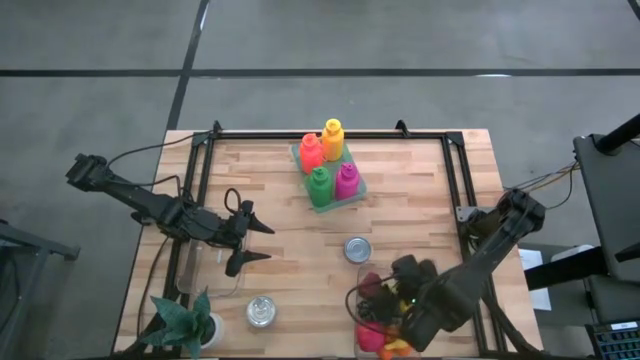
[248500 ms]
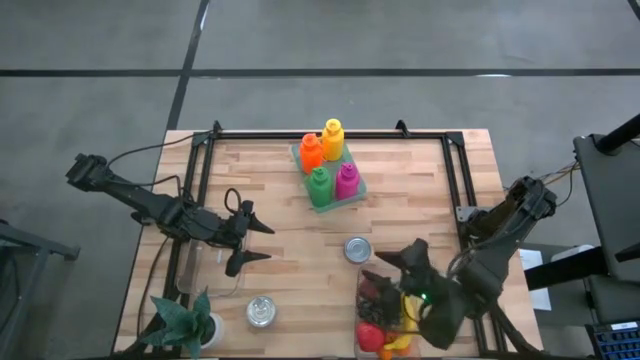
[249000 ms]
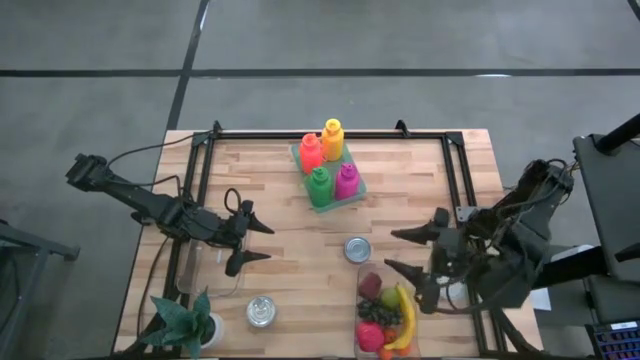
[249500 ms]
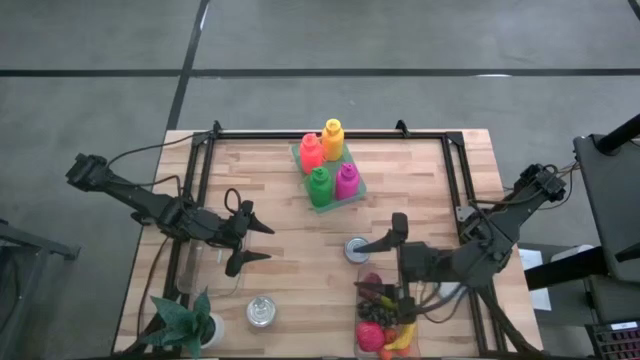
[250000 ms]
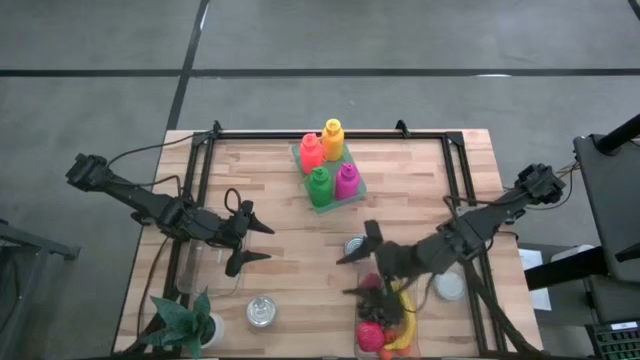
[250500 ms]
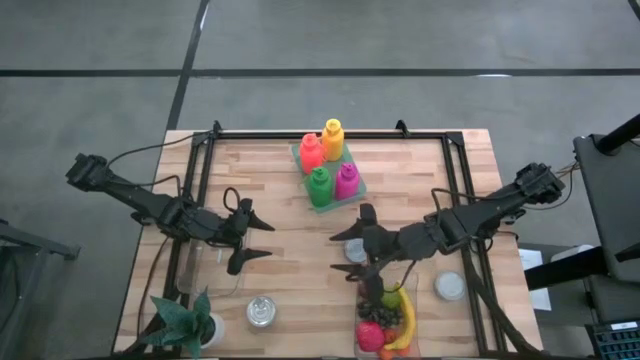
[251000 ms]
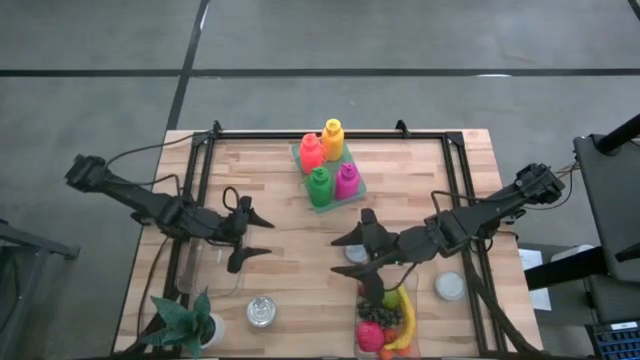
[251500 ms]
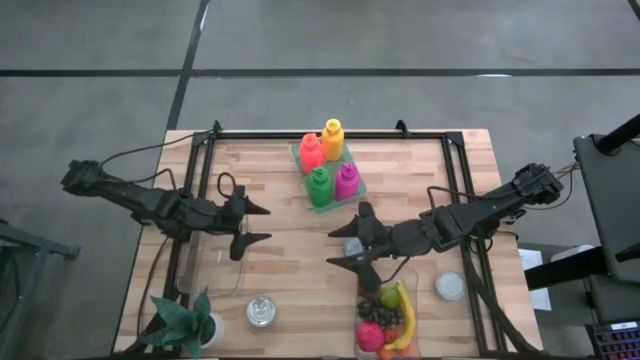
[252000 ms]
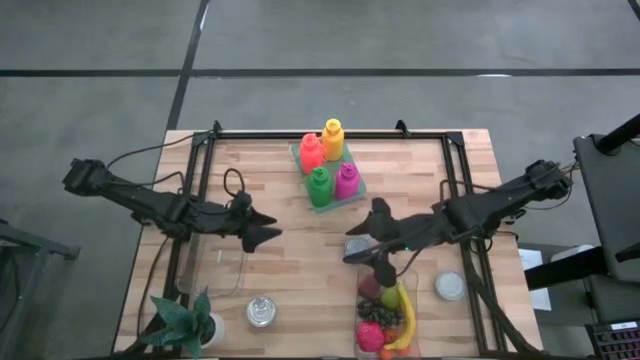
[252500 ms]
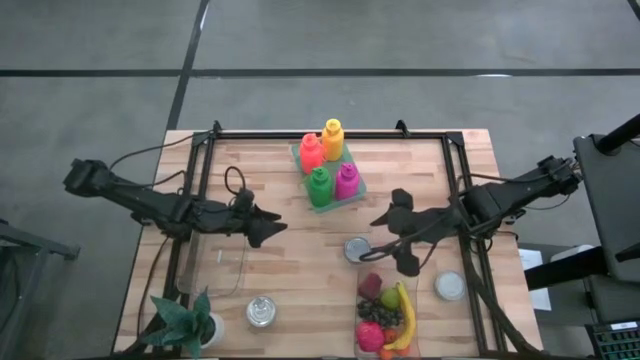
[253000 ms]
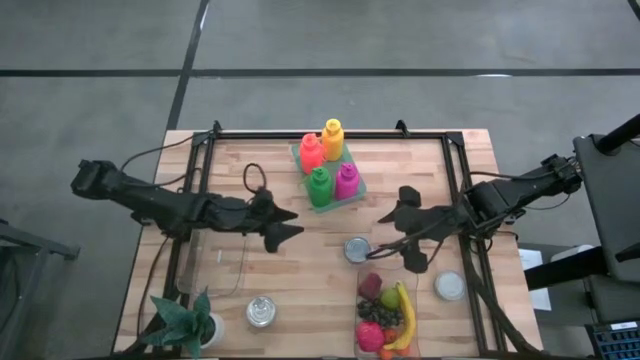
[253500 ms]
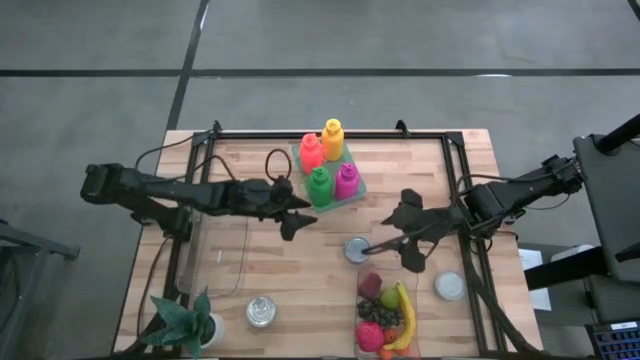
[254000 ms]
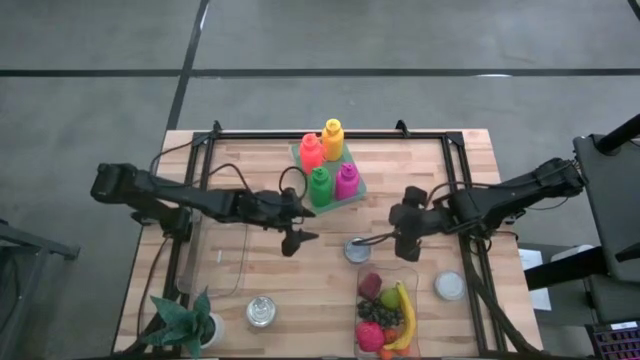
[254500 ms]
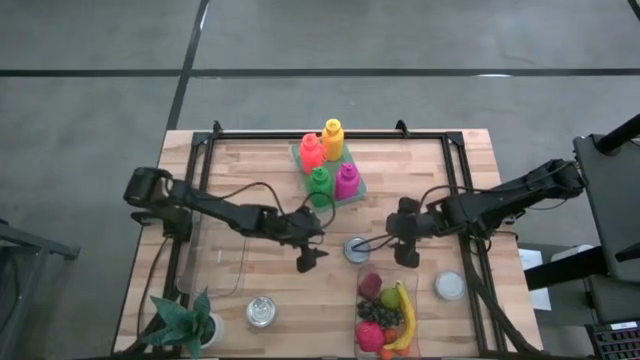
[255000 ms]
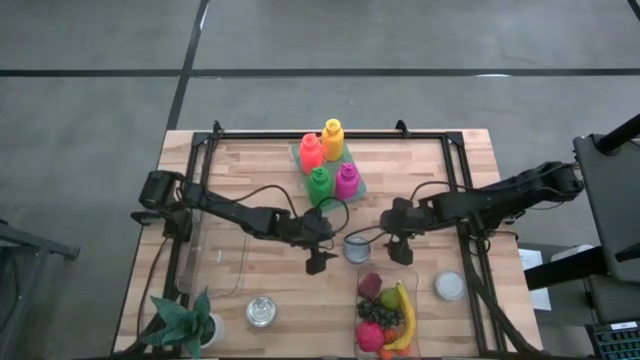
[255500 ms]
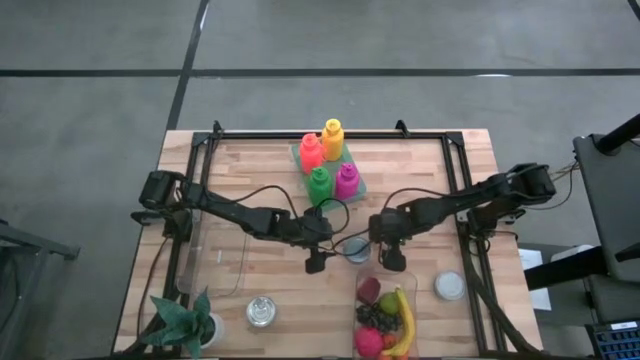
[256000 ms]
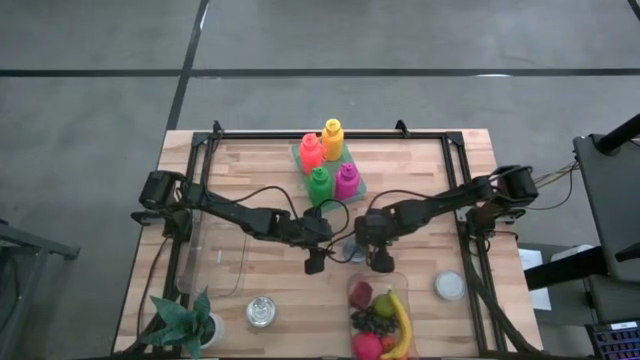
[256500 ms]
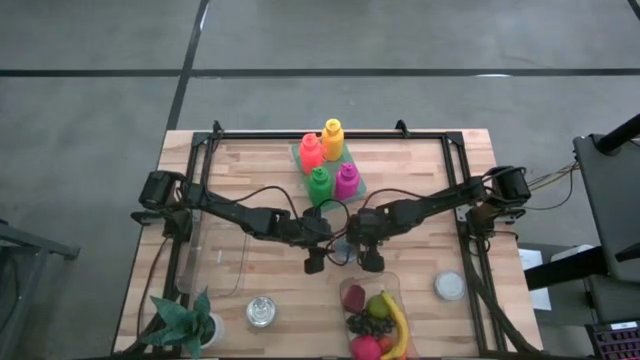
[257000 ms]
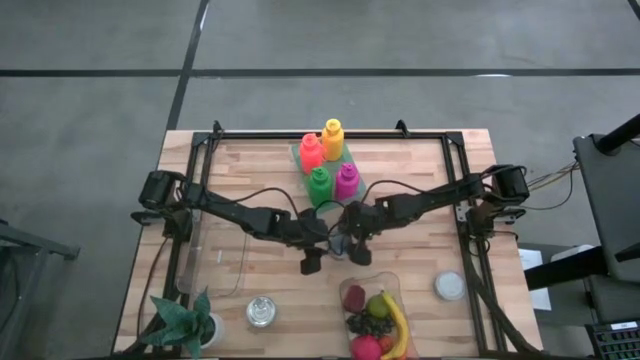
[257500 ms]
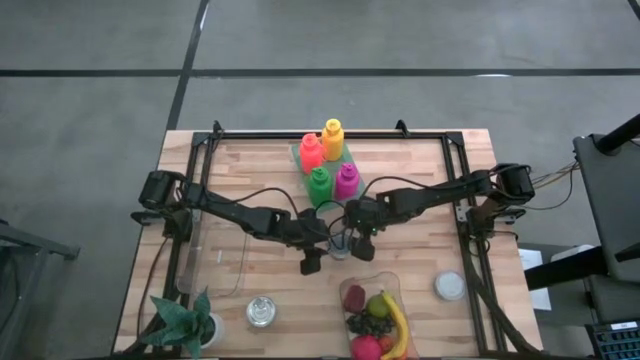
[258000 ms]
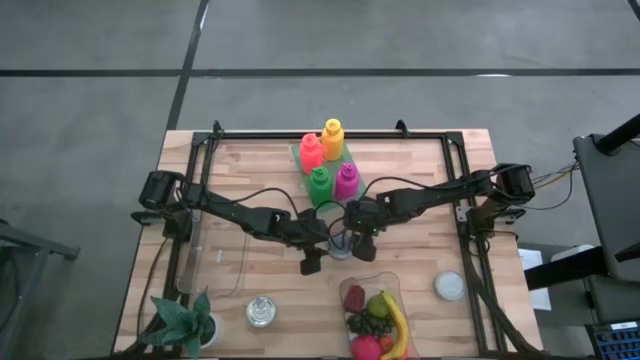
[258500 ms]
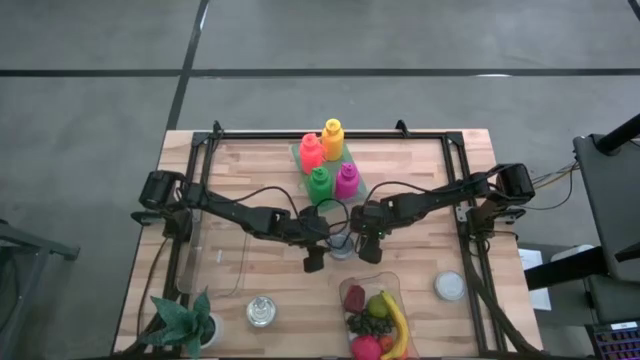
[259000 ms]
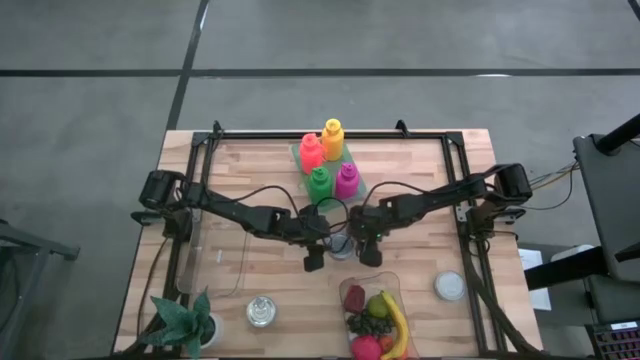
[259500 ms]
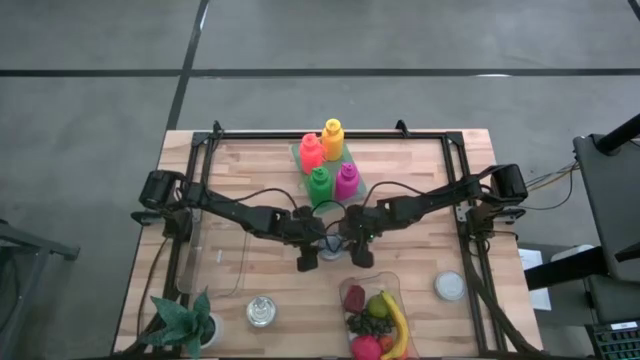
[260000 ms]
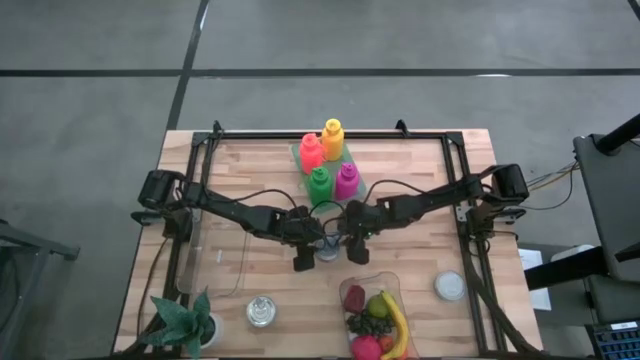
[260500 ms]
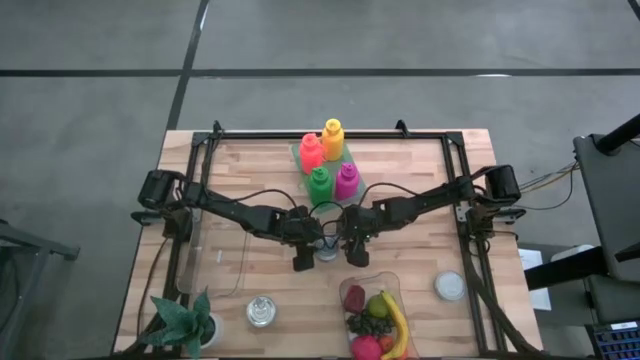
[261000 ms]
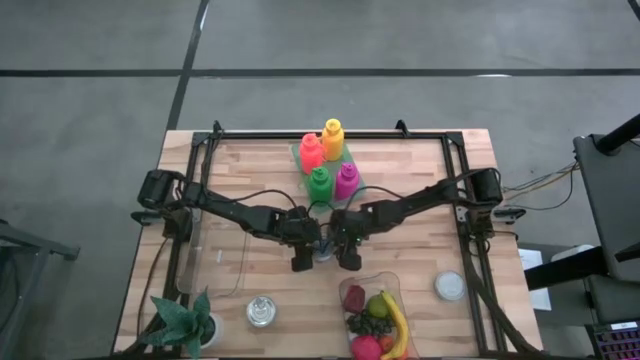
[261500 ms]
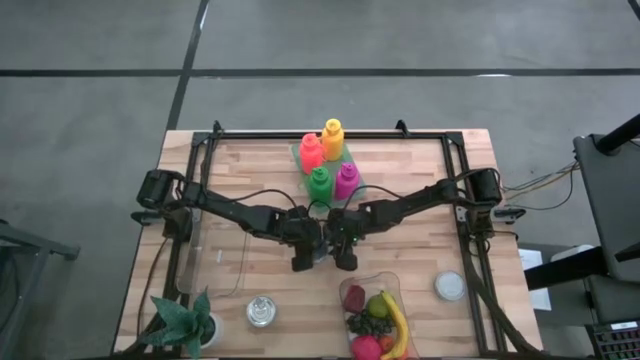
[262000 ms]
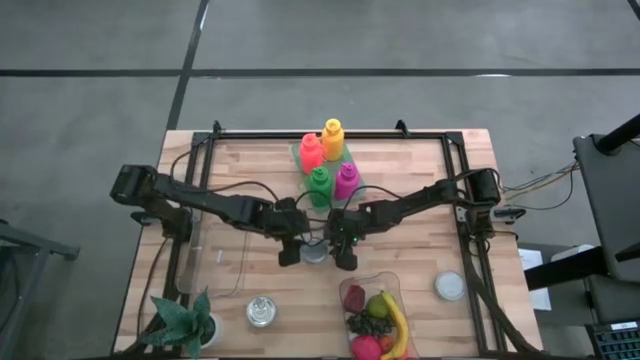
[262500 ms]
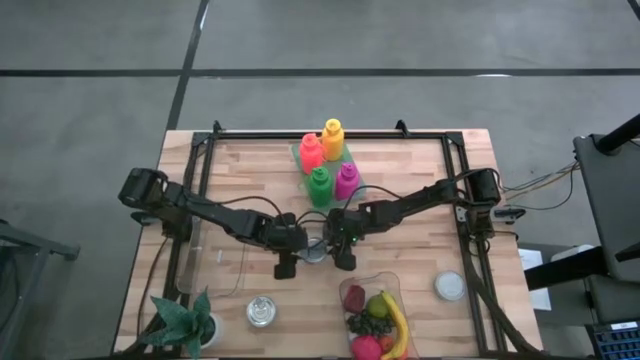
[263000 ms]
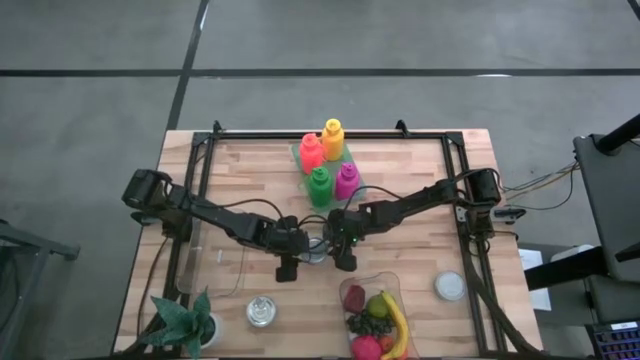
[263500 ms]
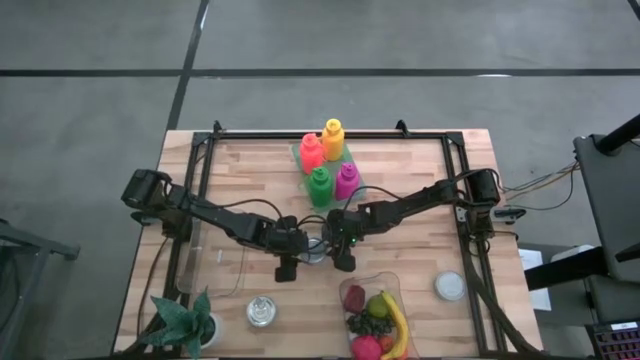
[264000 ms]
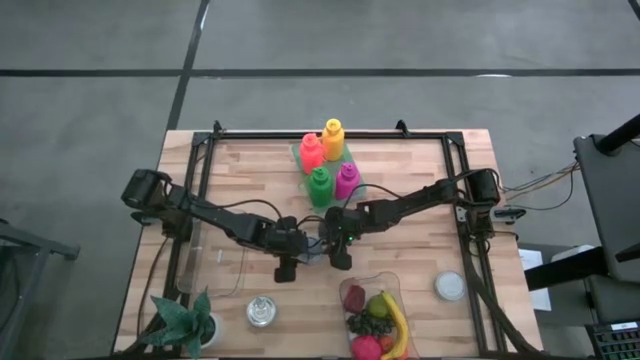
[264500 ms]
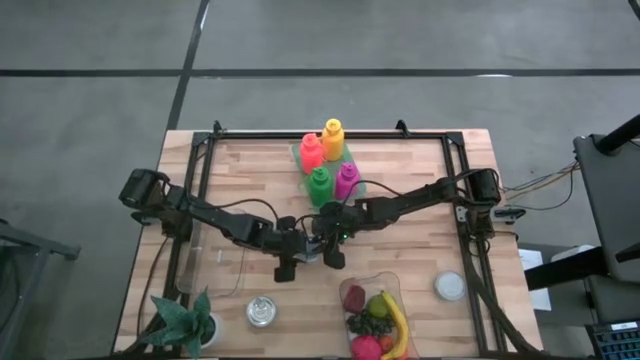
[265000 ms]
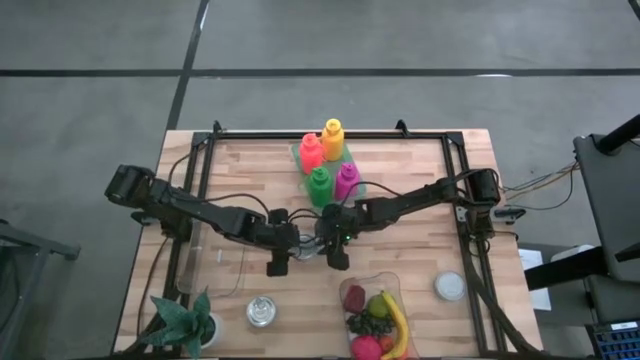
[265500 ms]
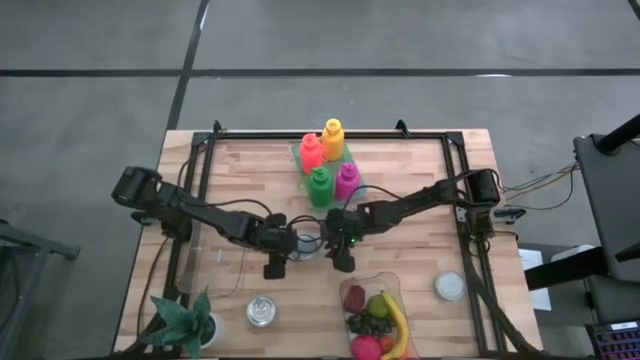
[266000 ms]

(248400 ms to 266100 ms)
Task: Pick & Place Food Item
Put the red tuna can into the top transparent bin

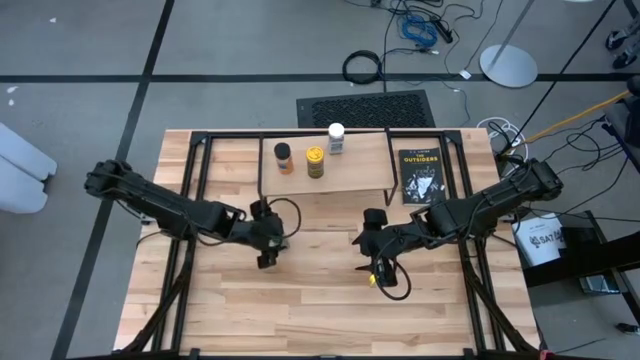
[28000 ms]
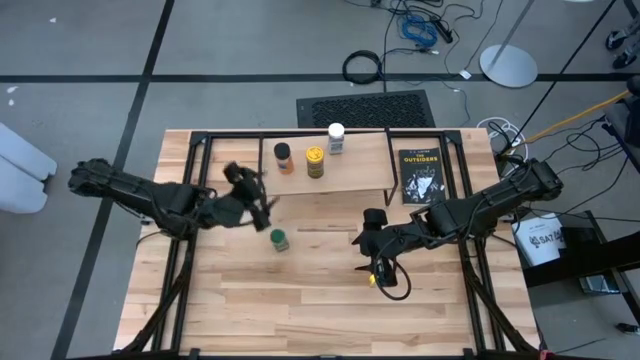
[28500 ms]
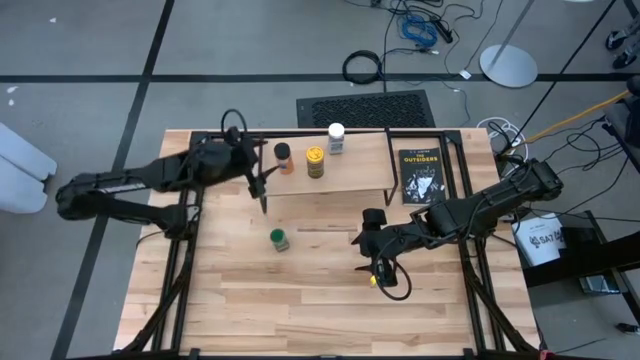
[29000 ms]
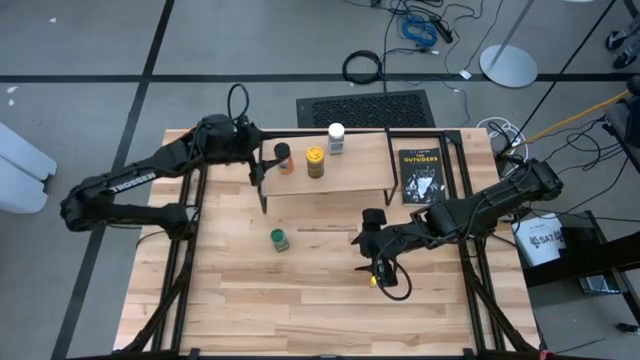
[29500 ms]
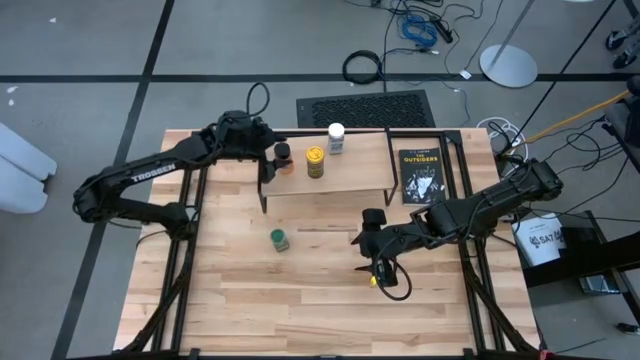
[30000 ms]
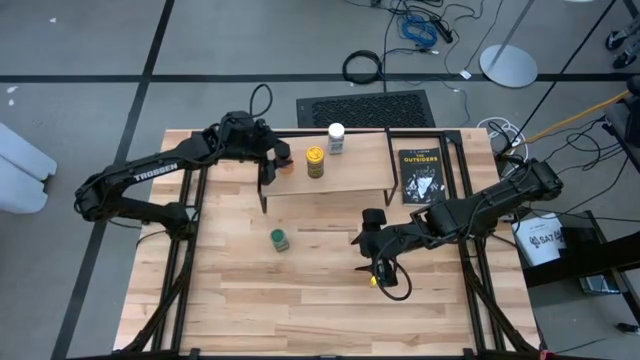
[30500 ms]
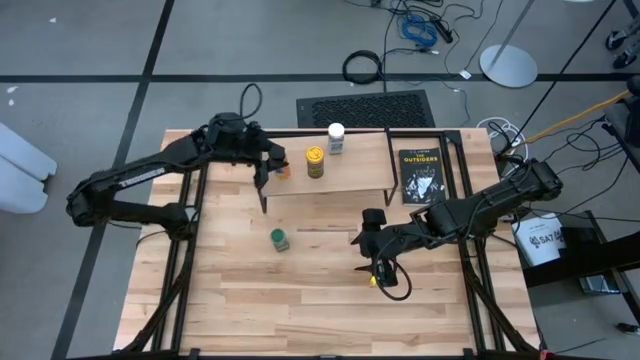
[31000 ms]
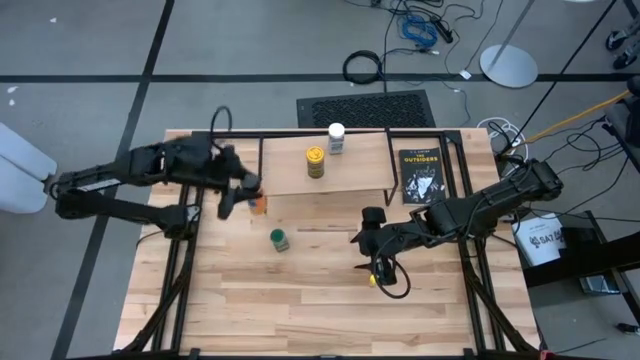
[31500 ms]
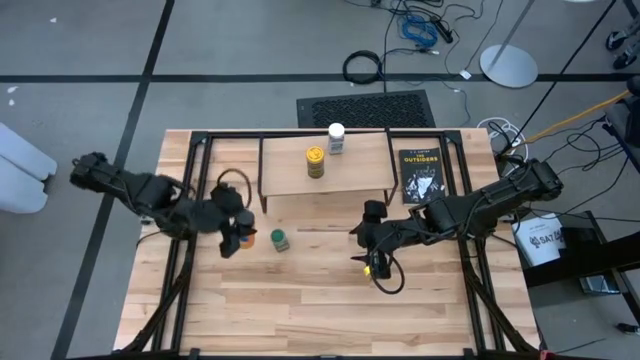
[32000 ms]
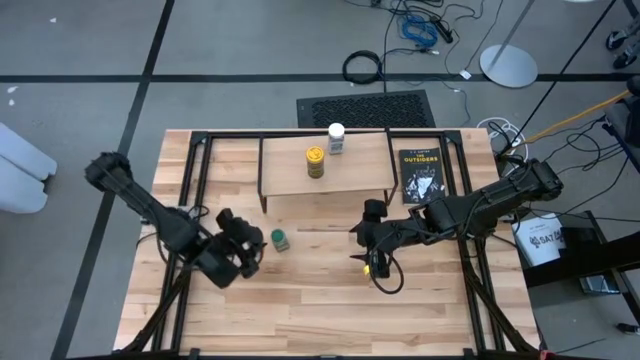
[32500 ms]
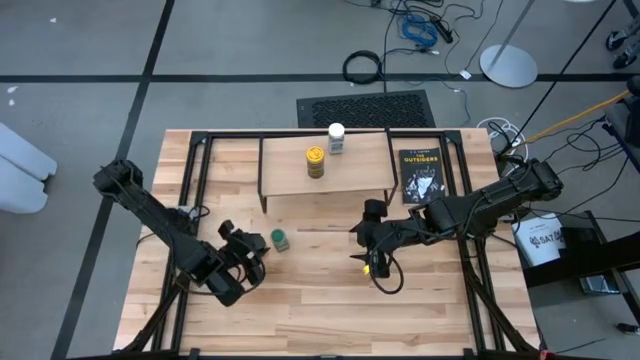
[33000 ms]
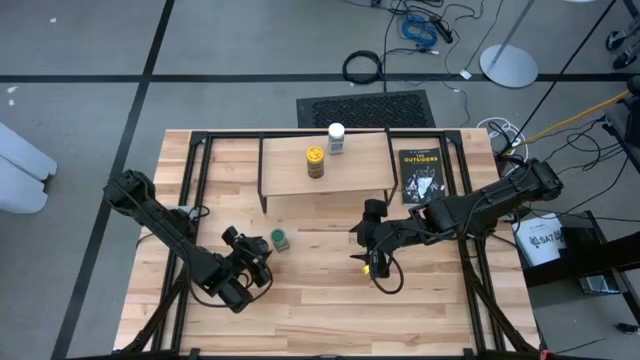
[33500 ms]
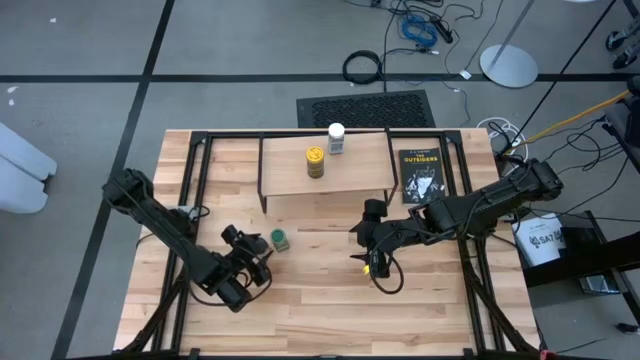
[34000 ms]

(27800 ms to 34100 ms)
Task: Shelf spices
Remove the orange seasoning bottle from the shelf
